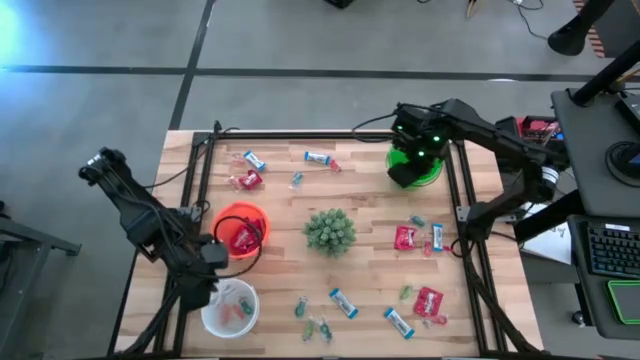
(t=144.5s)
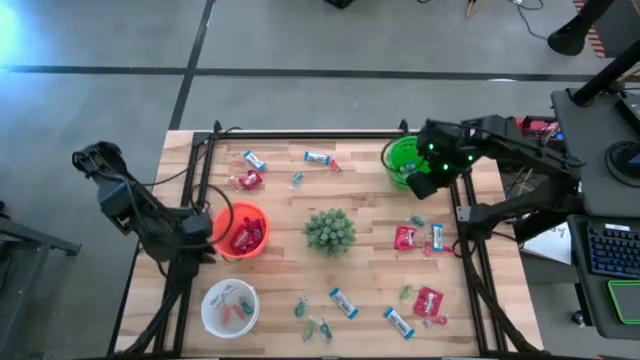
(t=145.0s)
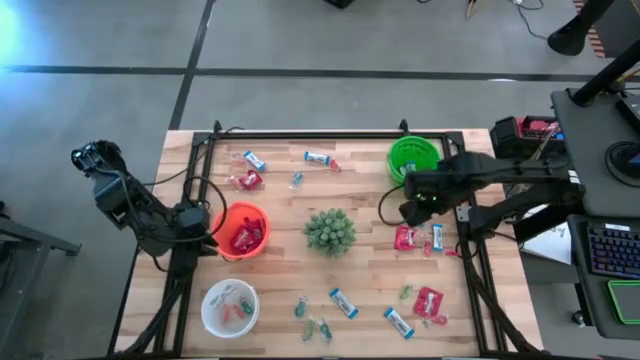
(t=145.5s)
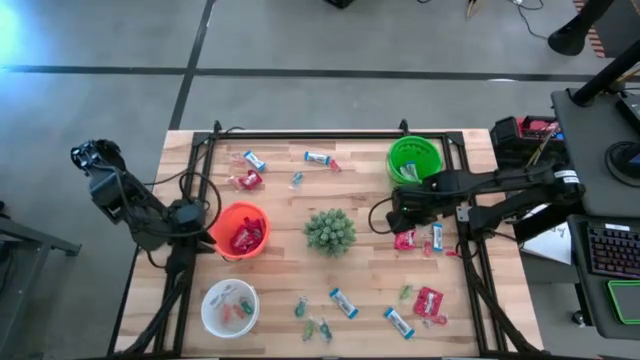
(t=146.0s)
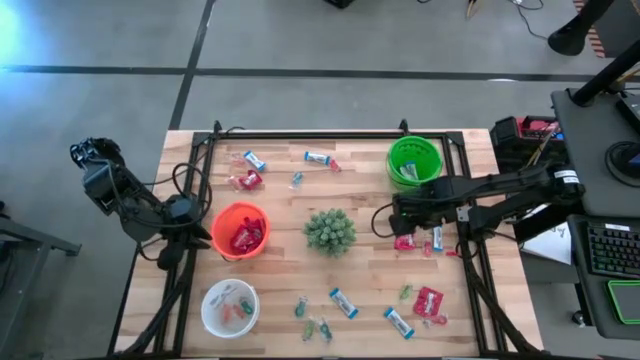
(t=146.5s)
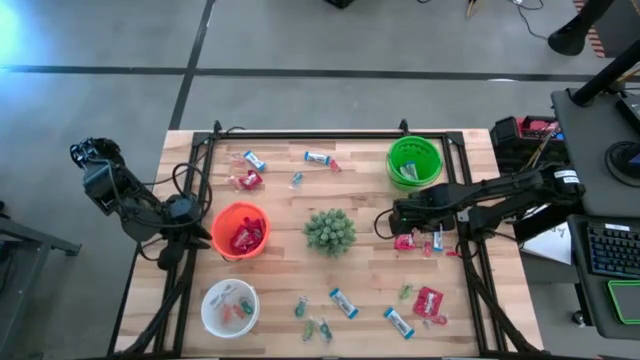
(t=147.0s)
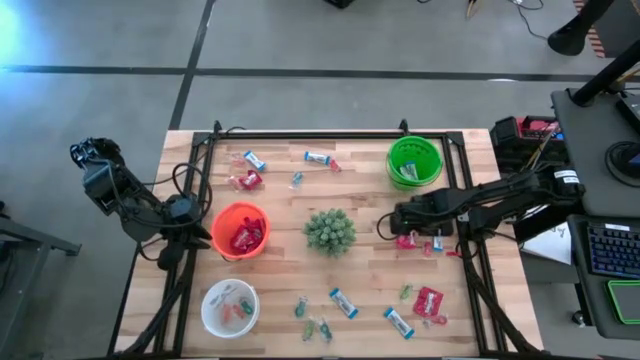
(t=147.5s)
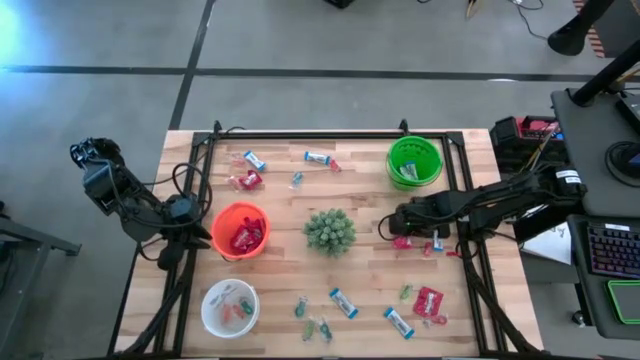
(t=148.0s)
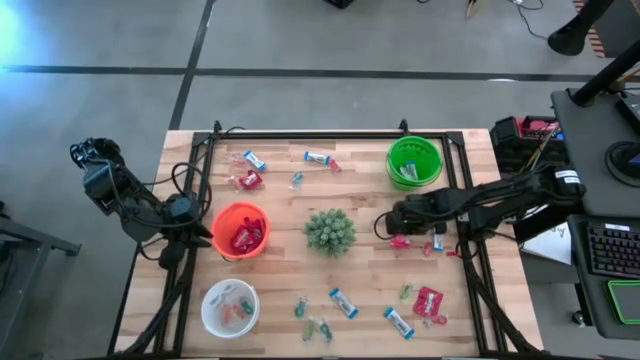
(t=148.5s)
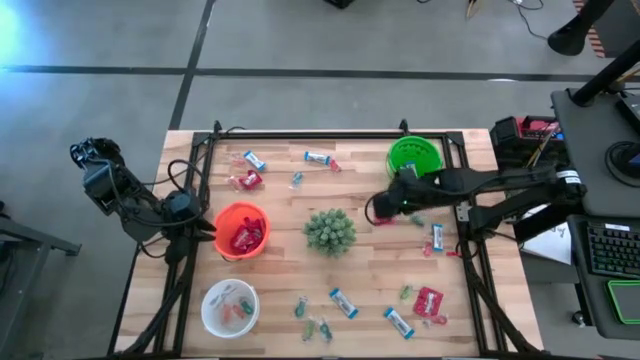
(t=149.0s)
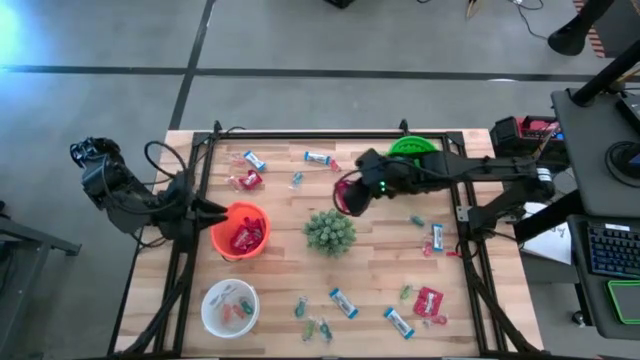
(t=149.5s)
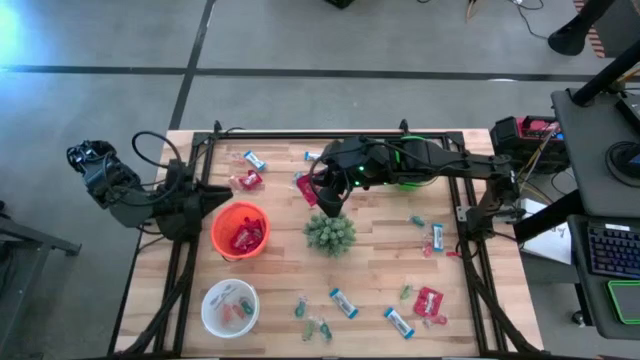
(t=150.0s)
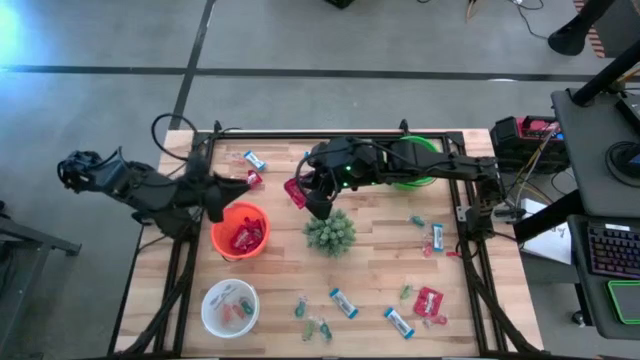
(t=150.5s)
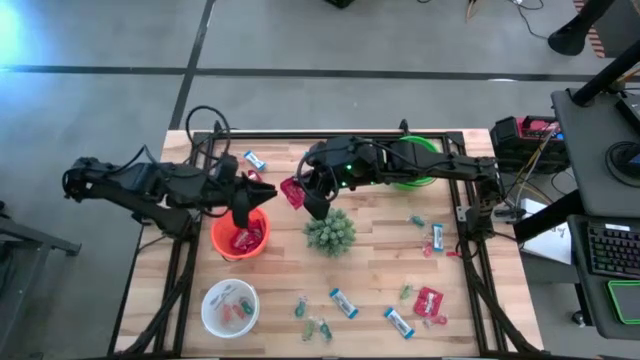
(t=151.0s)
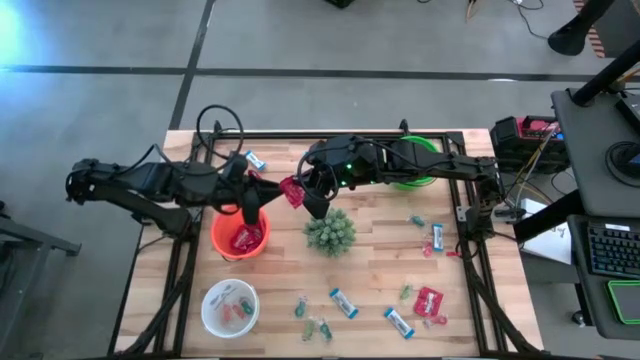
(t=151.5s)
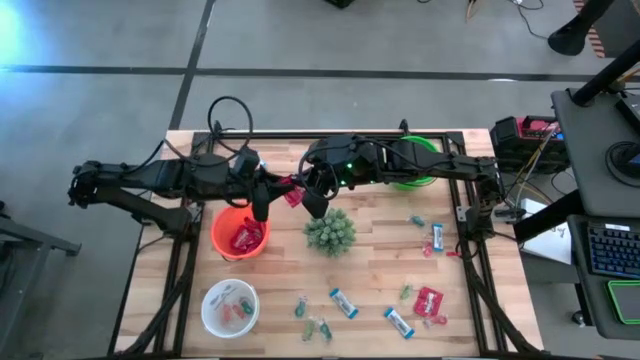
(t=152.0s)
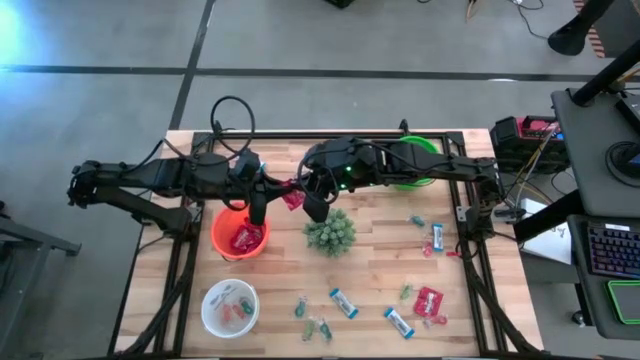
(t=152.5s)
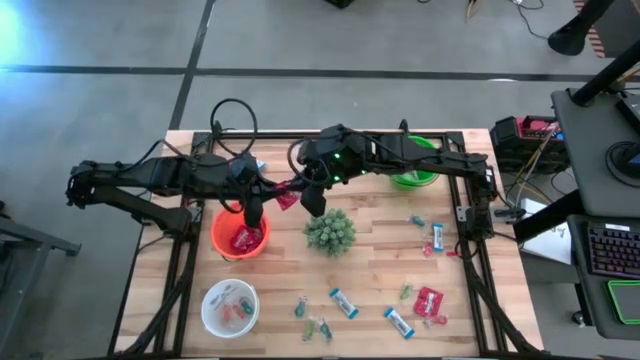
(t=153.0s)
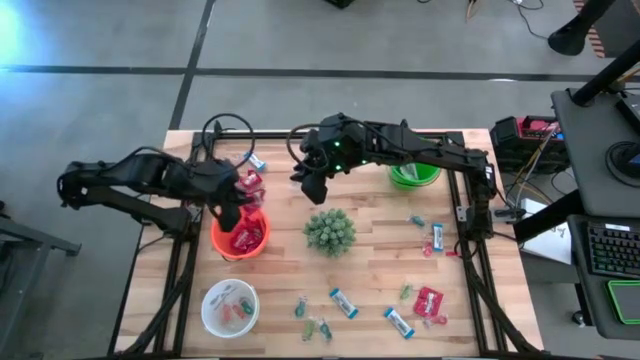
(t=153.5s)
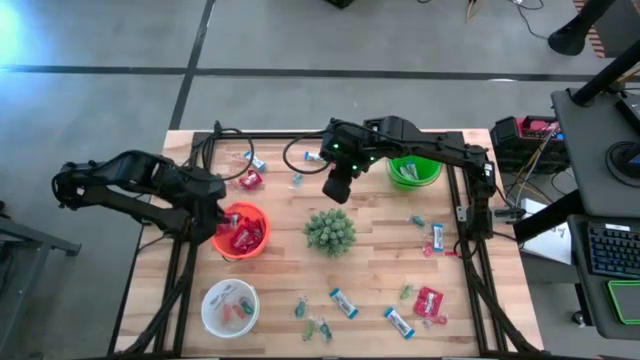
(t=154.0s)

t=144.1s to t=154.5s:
Task: Sort candy
Put the red candy into the orange bucket

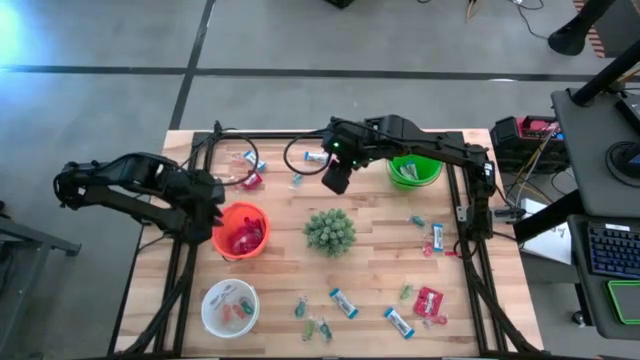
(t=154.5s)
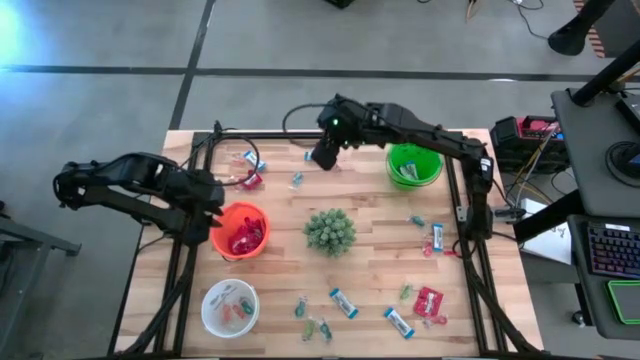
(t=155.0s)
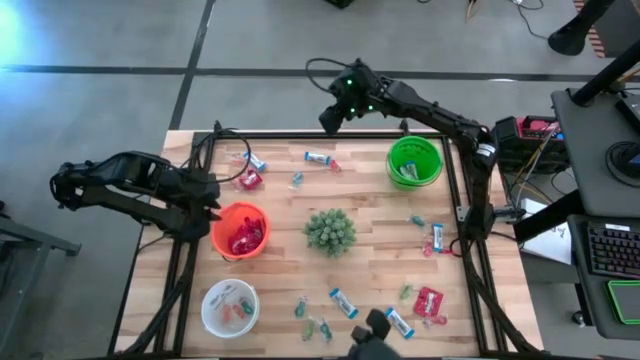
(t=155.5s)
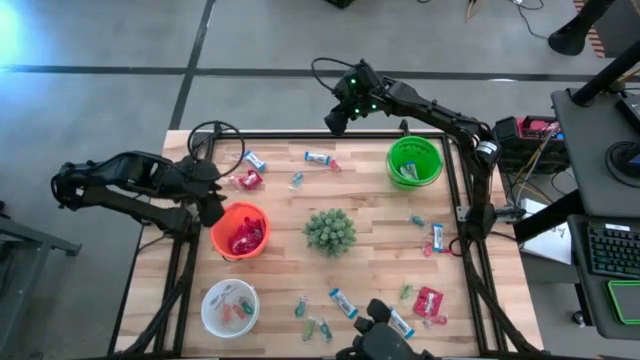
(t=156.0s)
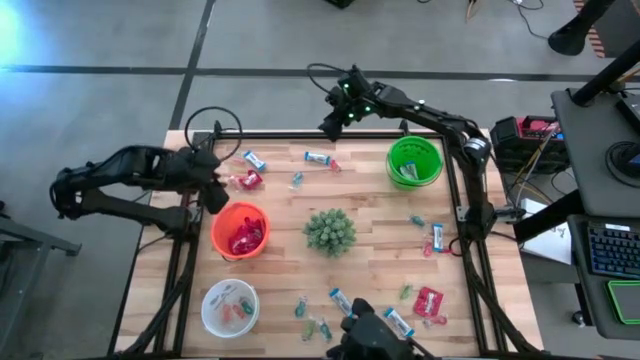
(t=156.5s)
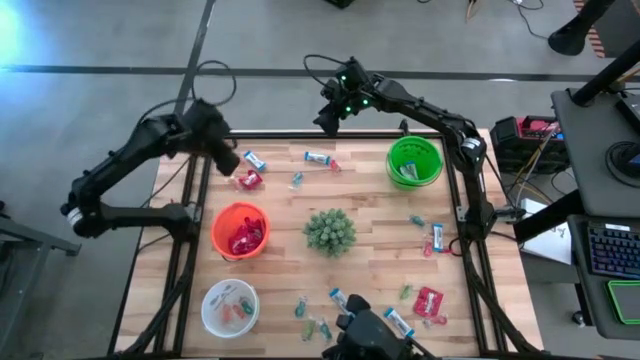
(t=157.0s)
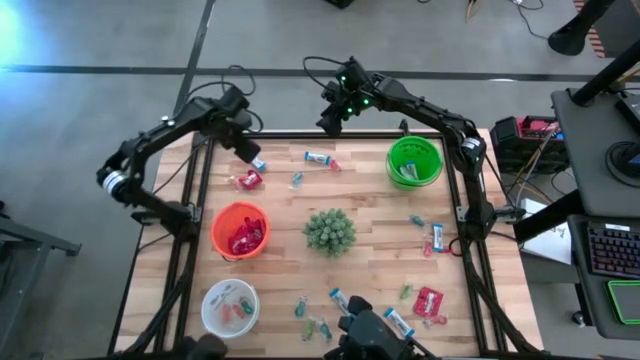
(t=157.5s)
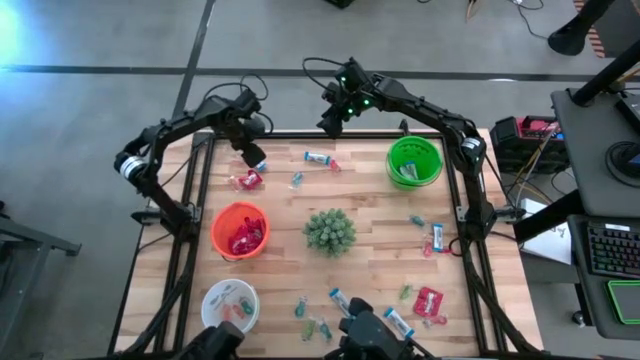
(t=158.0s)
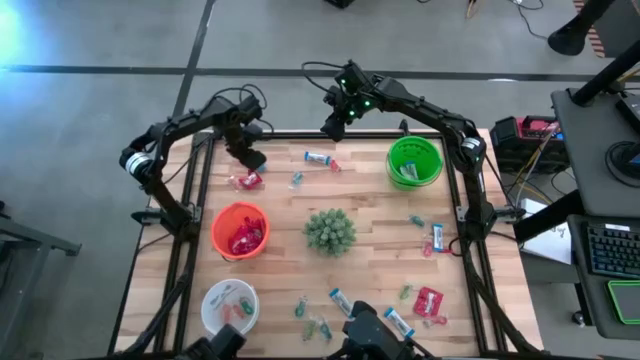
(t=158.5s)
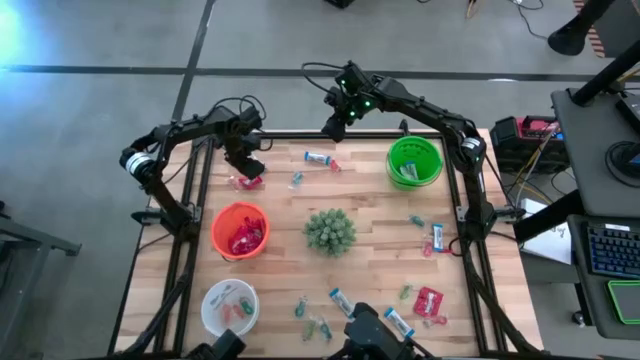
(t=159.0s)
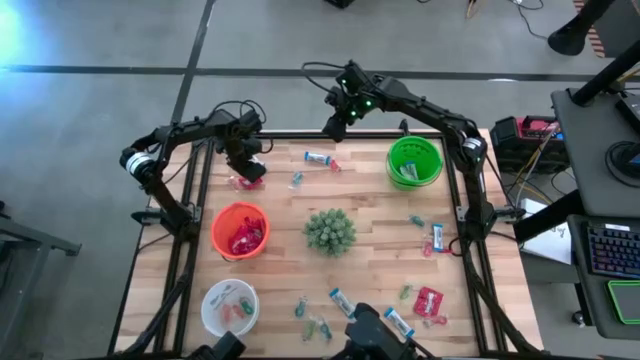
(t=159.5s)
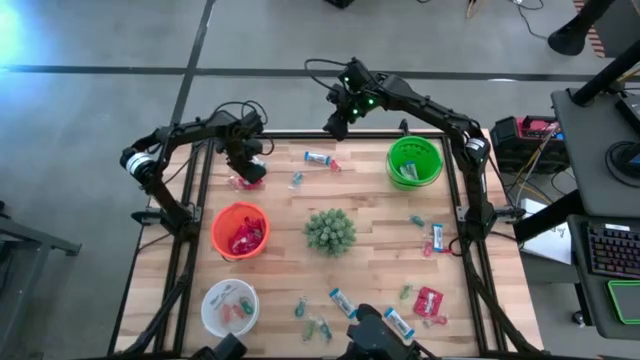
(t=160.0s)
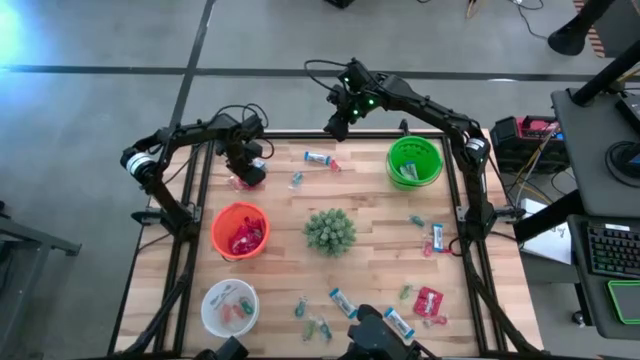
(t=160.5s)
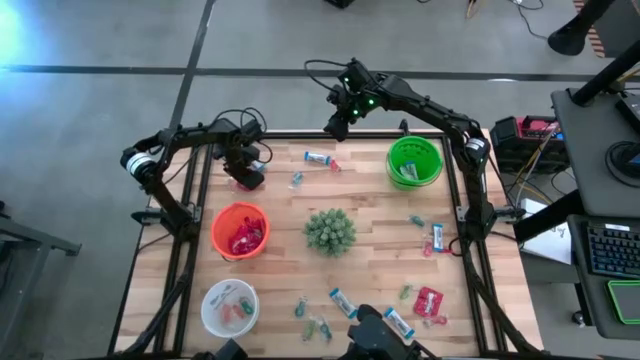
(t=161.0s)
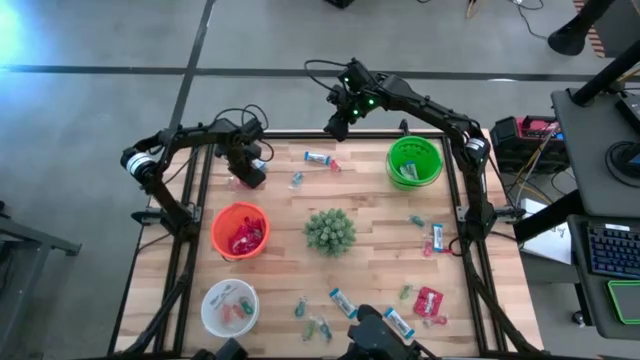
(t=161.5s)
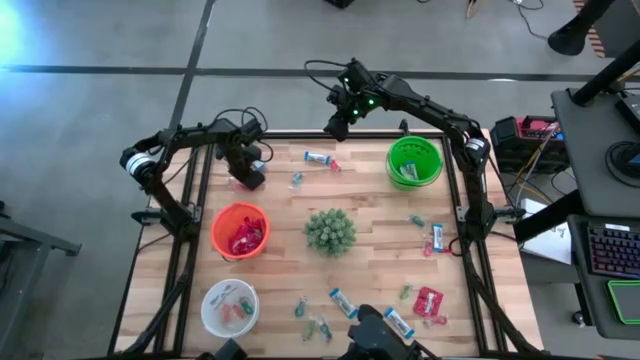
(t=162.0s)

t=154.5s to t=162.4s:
Put the red candy into the orange bucket

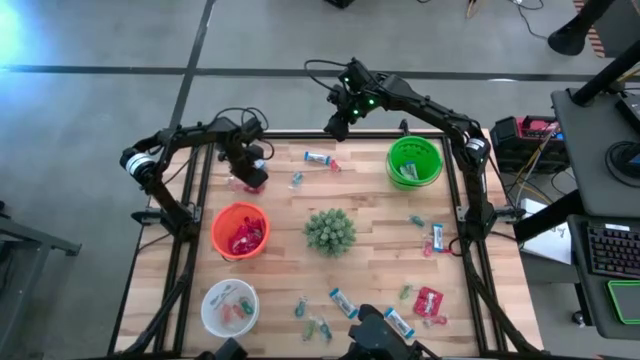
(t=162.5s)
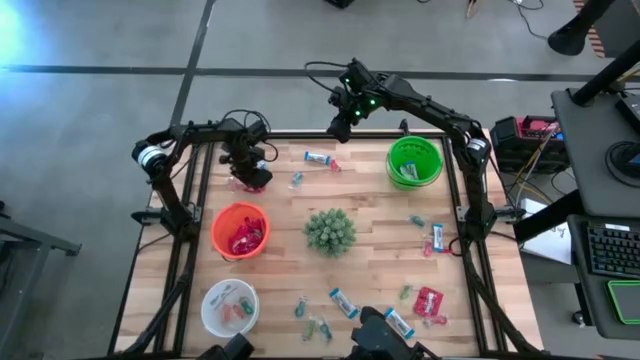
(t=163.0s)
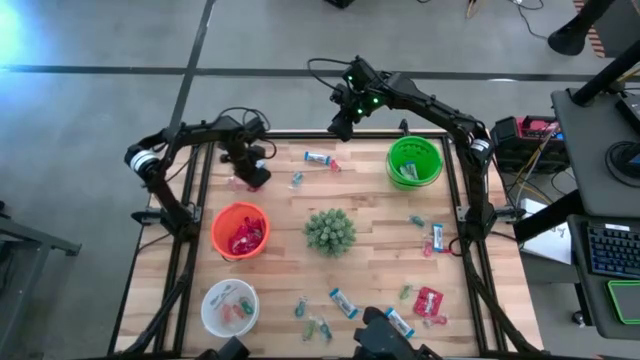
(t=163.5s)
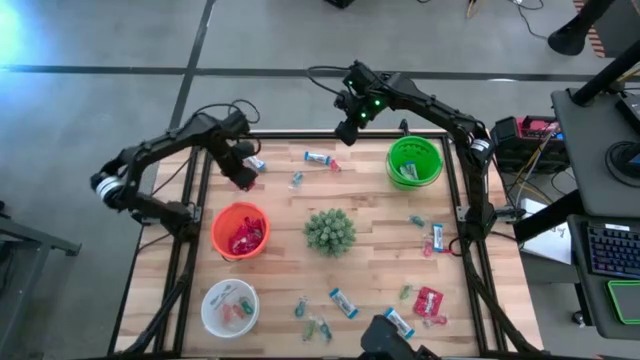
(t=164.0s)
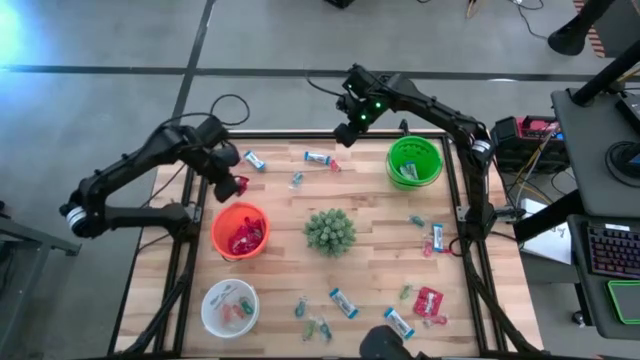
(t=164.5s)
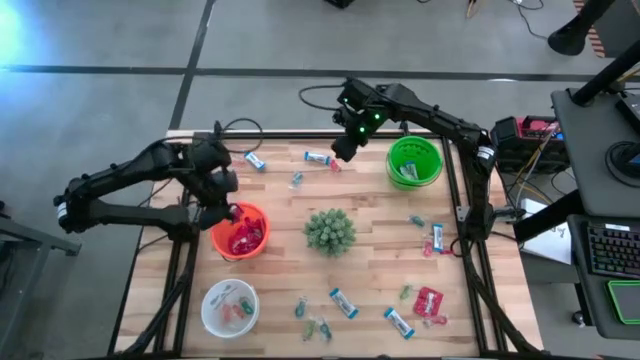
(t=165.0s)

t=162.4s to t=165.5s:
Put the red candy into the orange bucket
